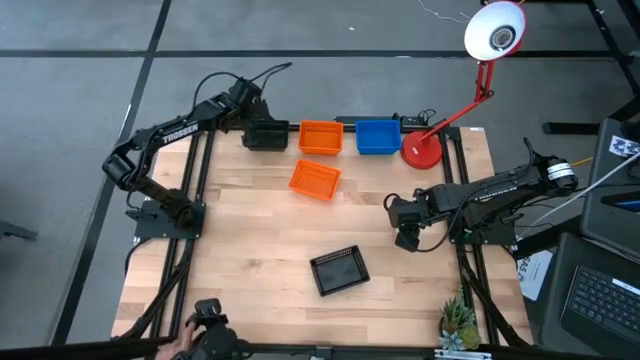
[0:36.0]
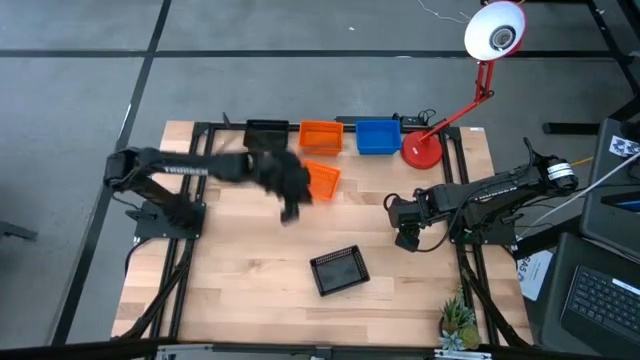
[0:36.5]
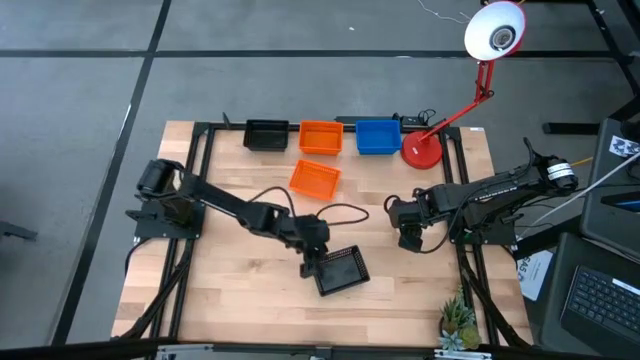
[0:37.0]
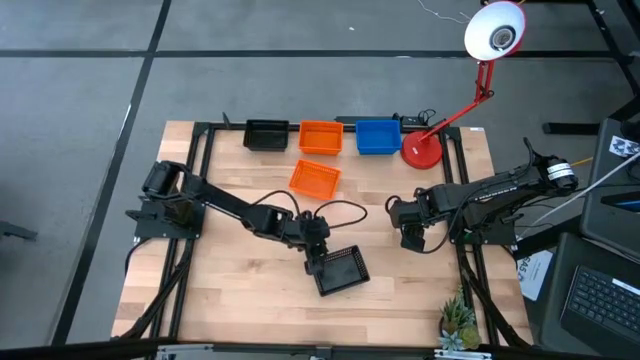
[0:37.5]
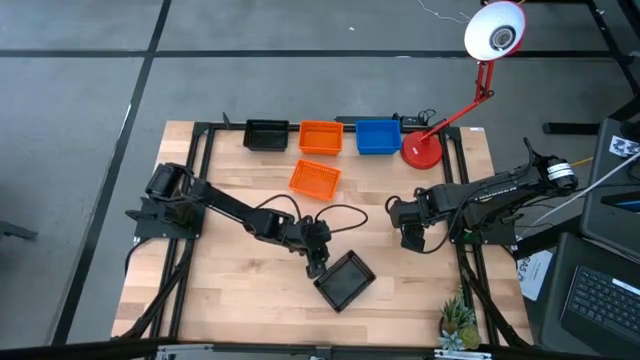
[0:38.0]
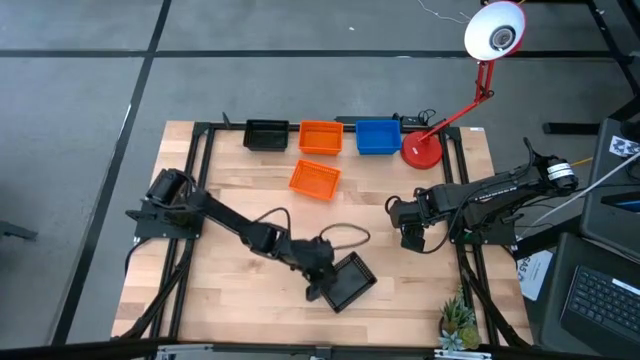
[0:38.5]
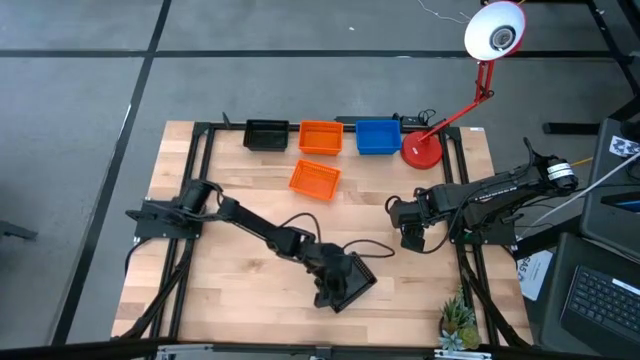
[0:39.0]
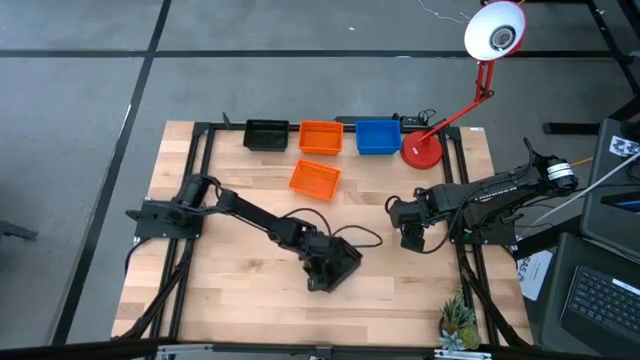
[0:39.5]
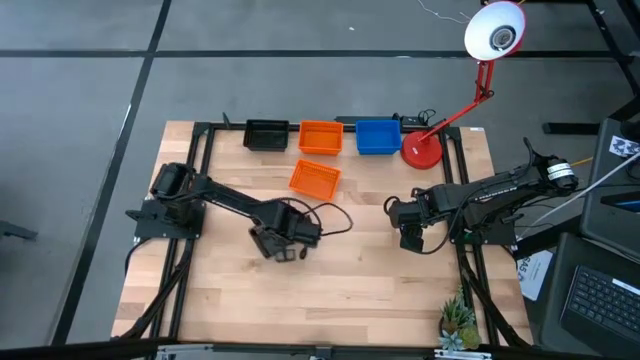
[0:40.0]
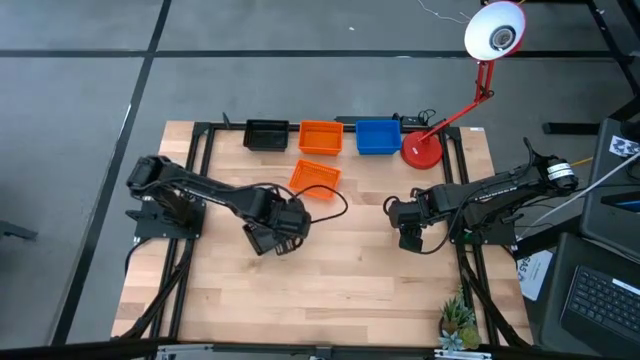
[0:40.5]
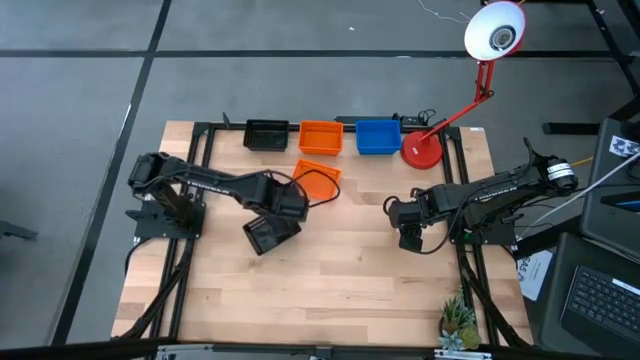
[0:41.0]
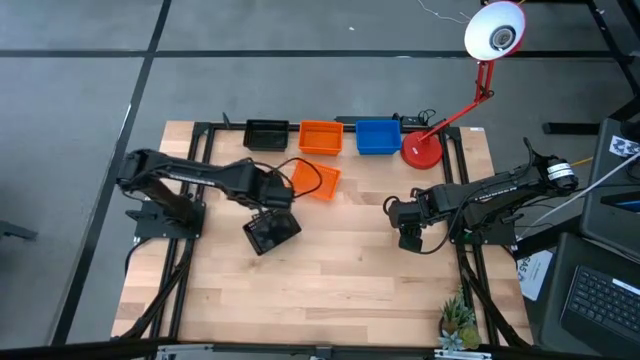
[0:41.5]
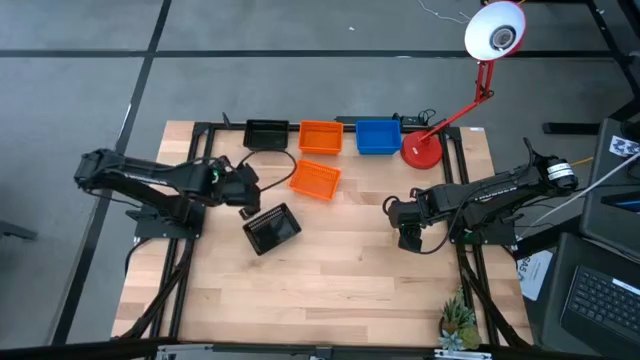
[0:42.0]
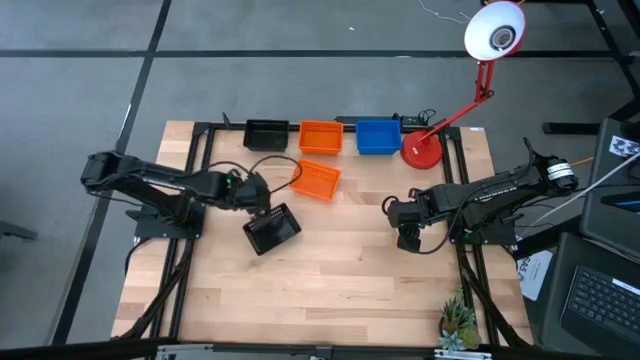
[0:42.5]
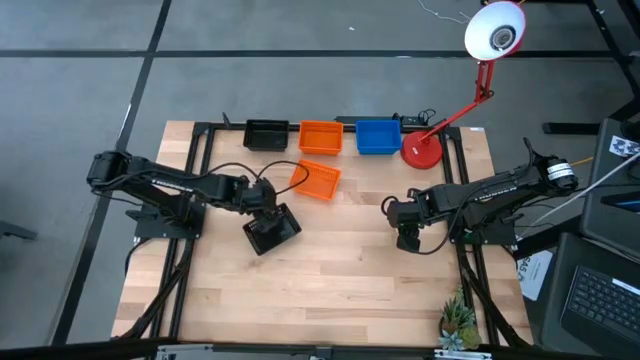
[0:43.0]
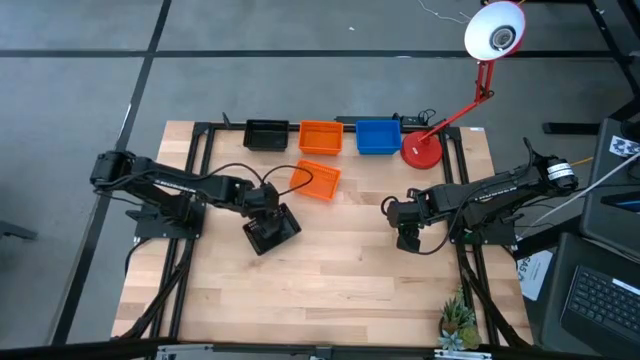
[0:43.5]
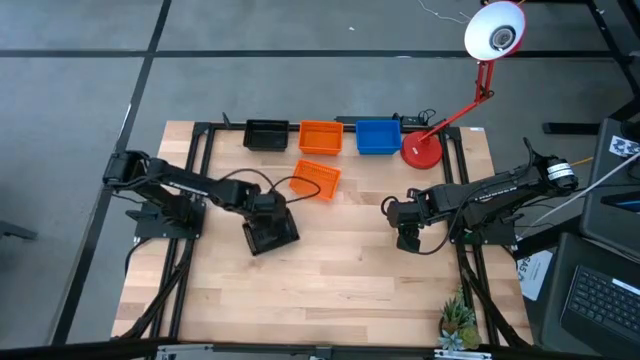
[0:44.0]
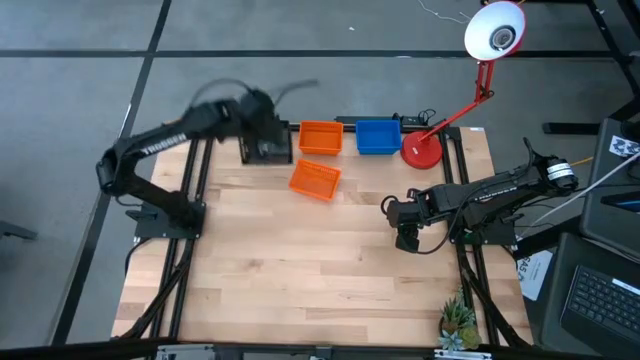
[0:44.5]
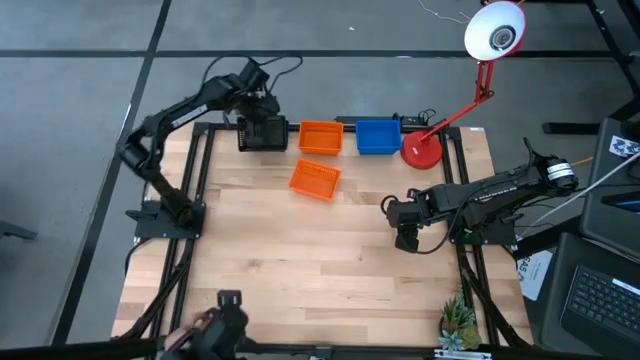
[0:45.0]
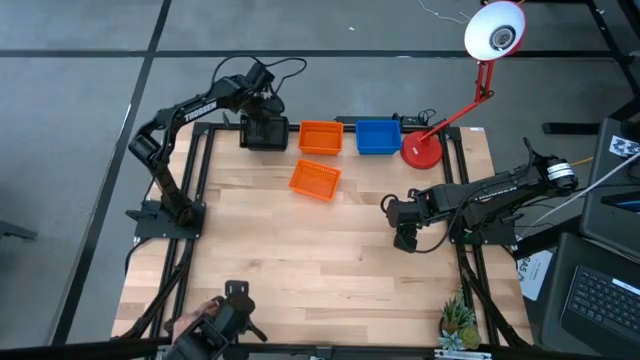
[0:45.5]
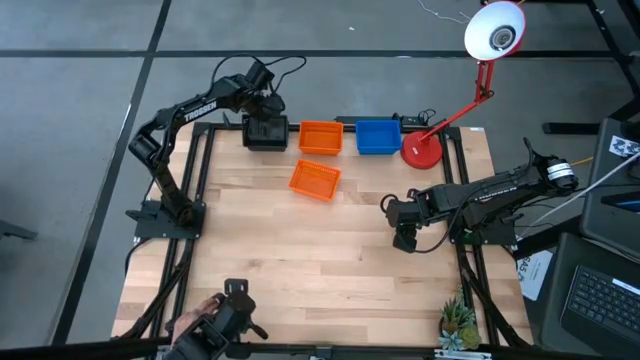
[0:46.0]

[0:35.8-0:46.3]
Stack the bottom black basket on top of the top black basket

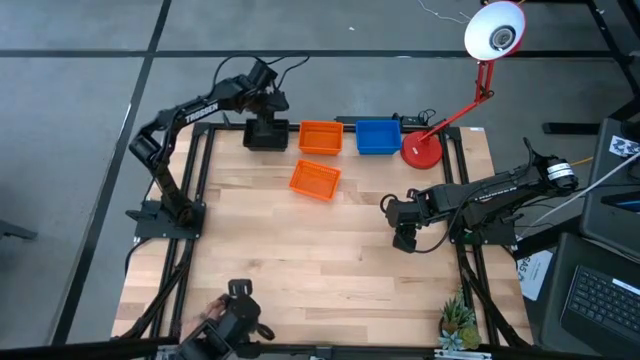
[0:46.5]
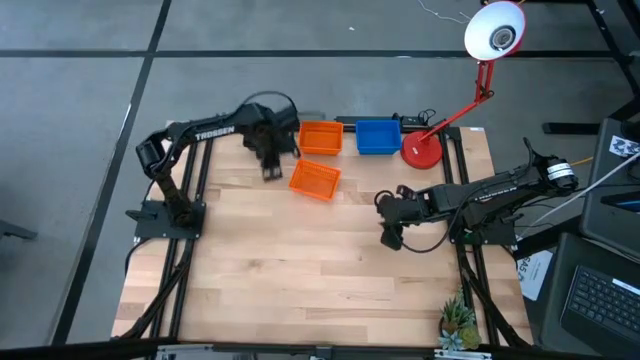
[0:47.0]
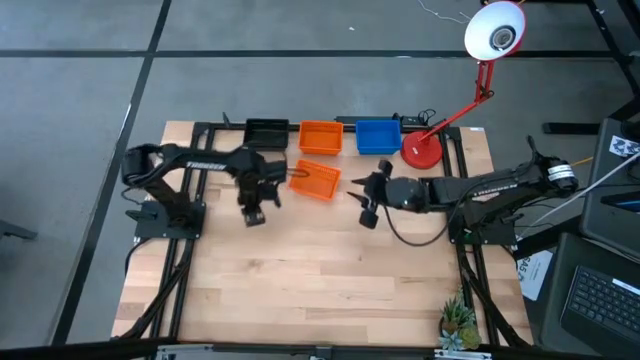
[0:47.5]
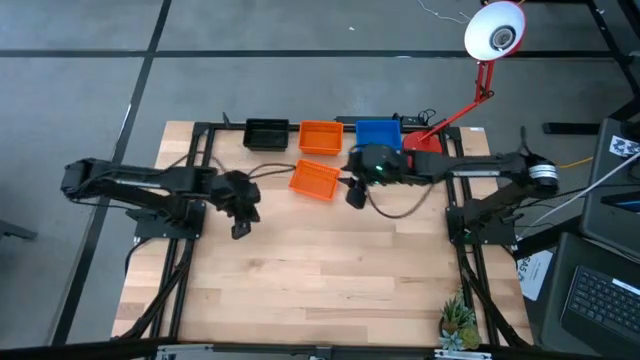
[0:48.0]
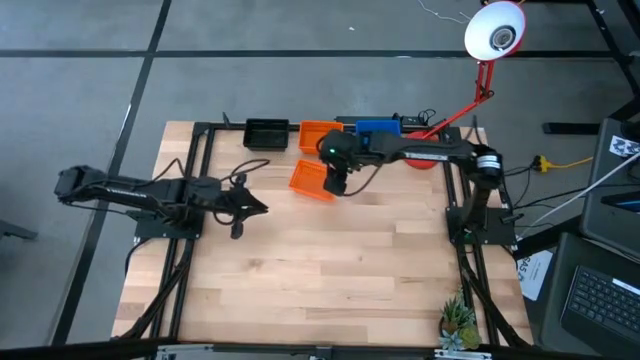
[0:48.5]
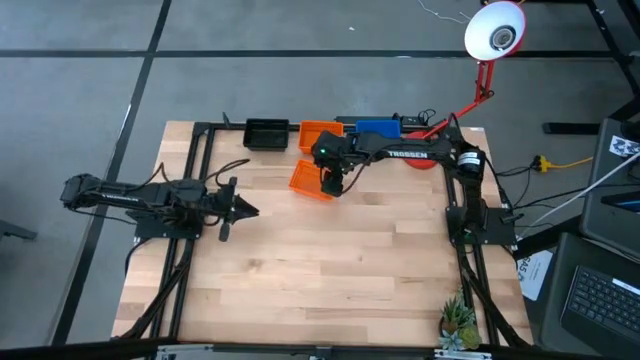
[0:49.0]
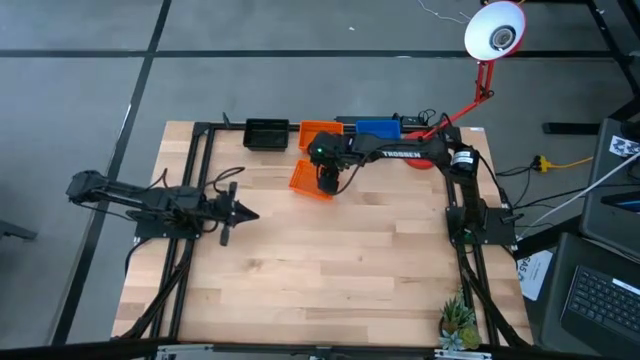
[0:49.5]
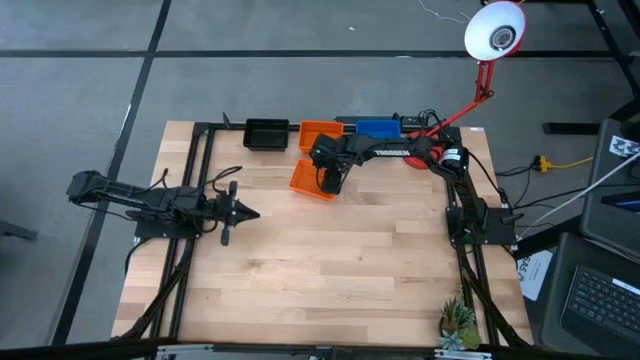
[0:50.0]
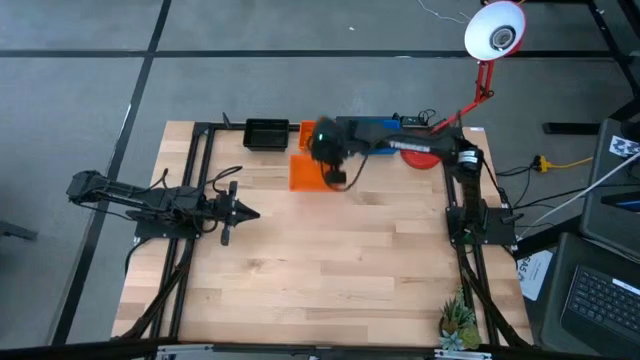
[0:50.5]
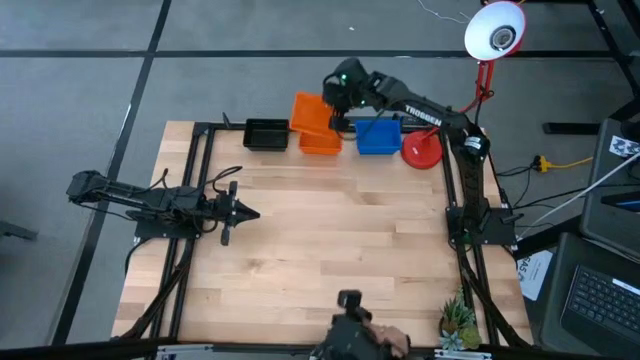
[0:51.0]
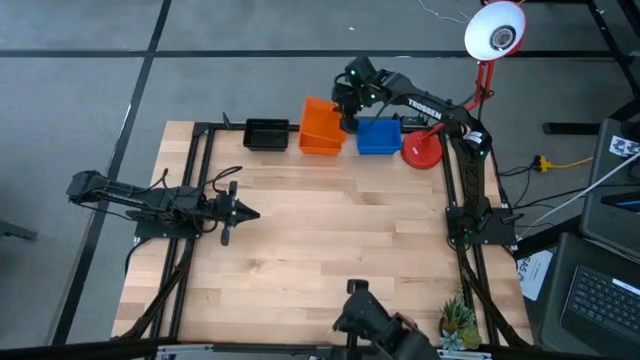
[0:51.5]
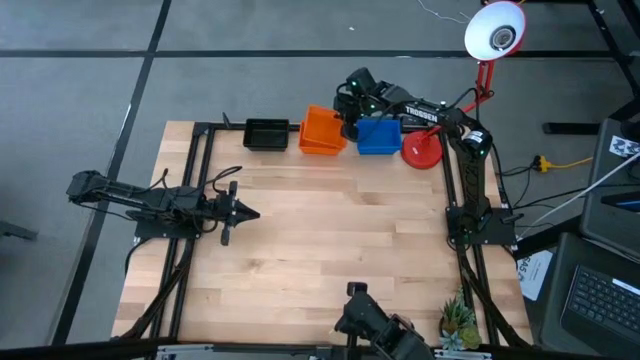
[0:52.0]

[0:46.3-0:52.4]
Stack the bottom orange basket on top of the top orange basket

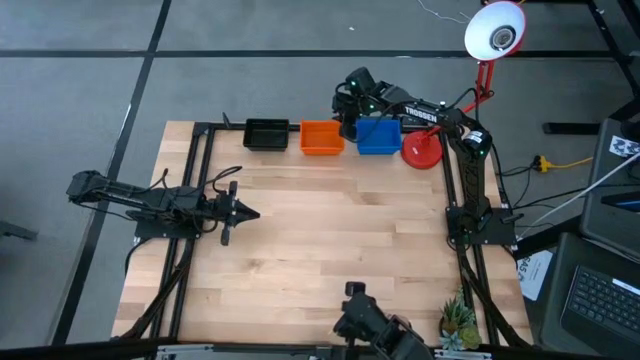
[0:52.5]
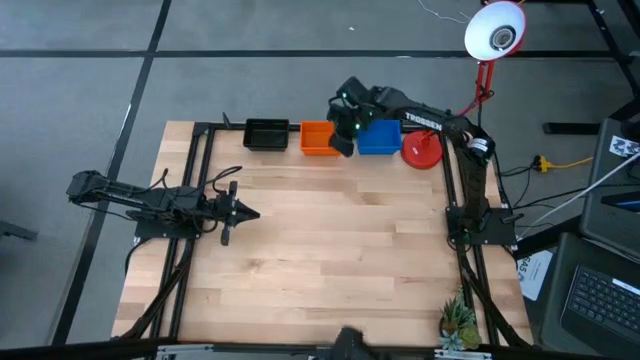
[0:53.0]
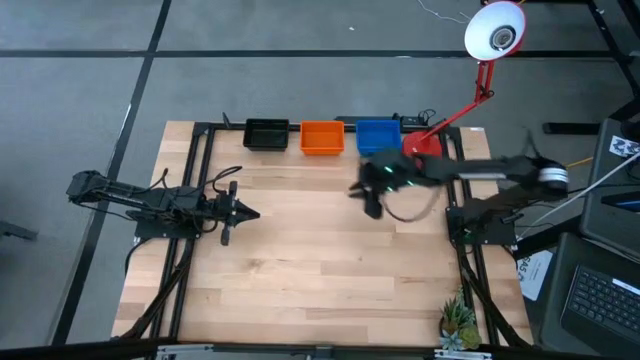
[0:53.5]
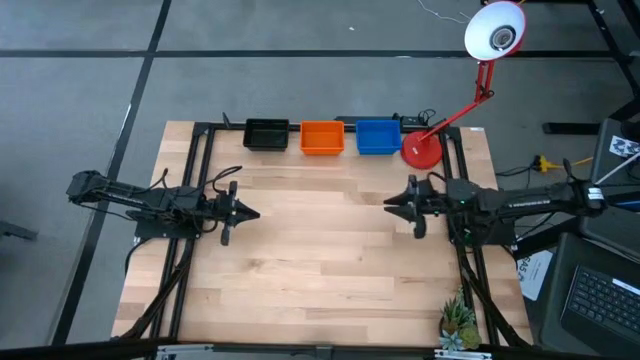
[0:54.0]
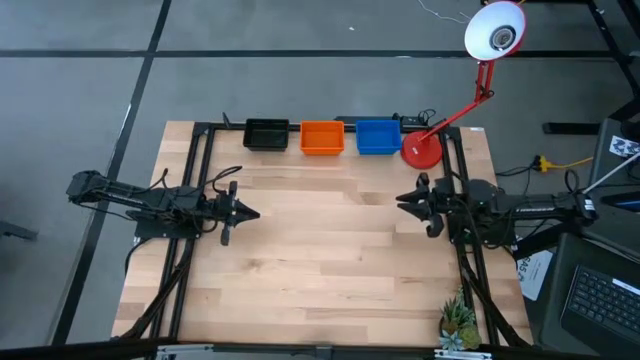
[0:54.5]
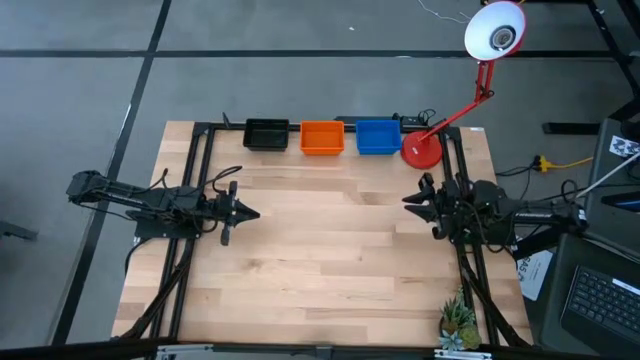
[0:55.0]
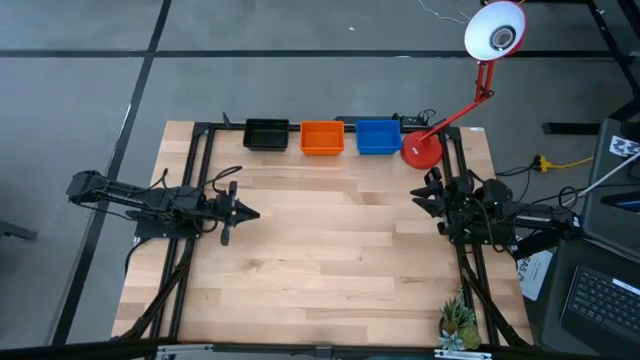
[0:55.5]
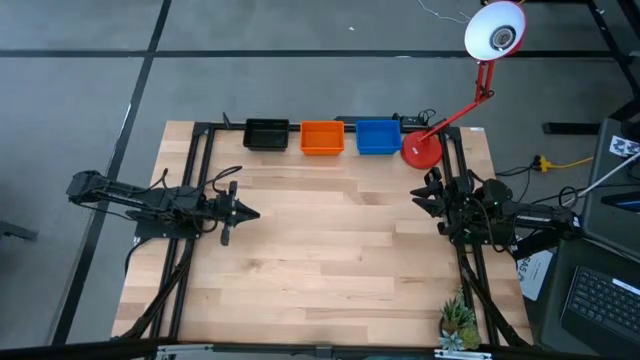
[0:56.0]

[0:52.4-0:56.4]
Return to Home Position
